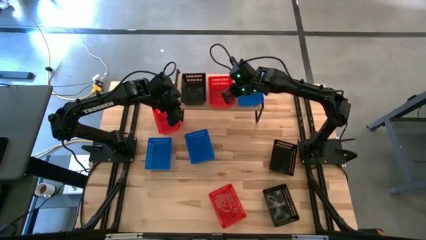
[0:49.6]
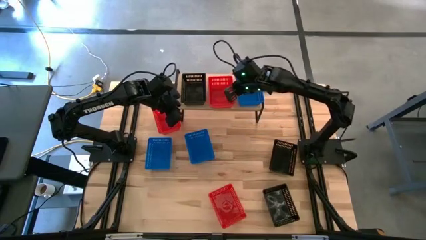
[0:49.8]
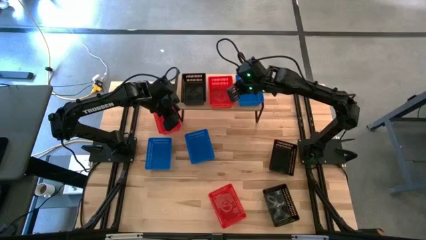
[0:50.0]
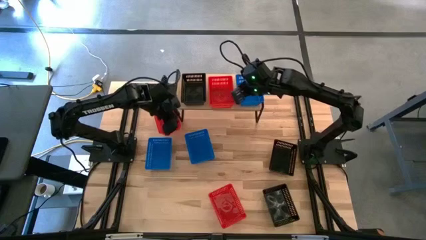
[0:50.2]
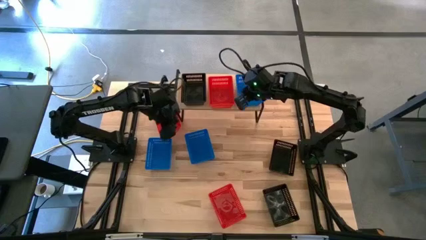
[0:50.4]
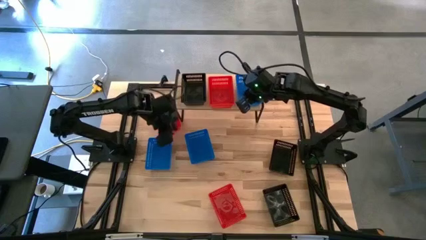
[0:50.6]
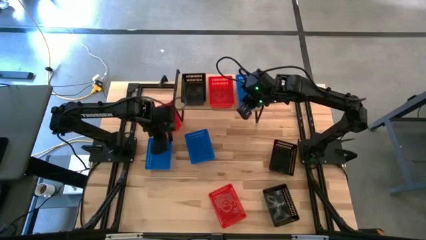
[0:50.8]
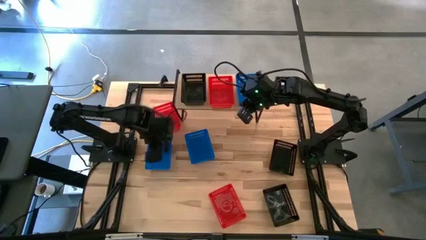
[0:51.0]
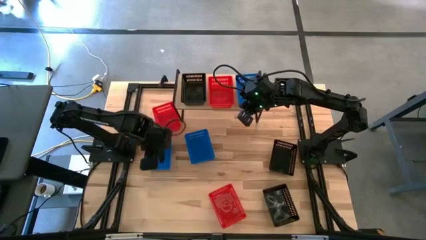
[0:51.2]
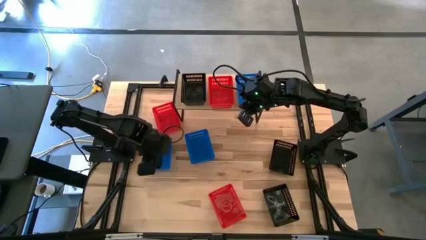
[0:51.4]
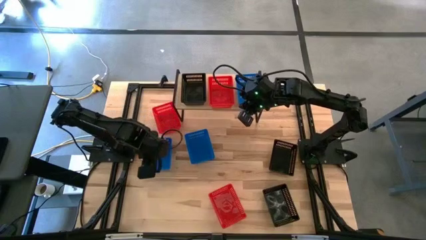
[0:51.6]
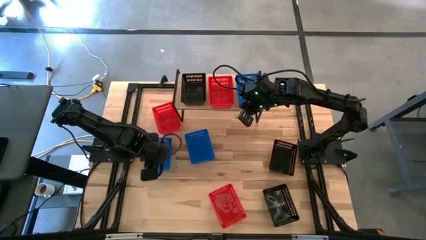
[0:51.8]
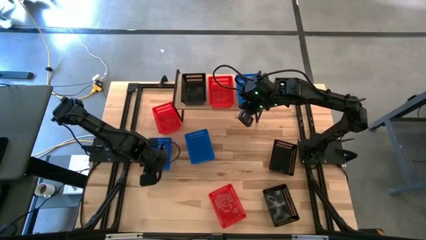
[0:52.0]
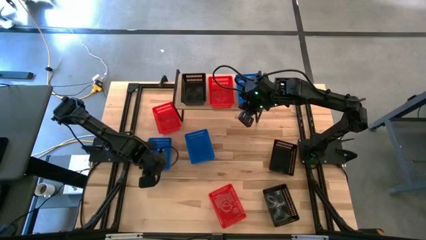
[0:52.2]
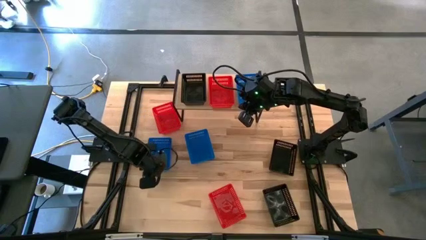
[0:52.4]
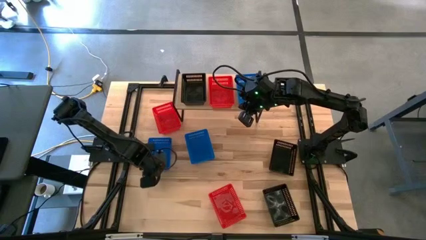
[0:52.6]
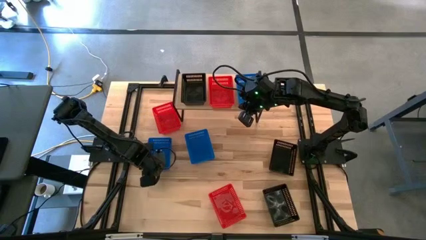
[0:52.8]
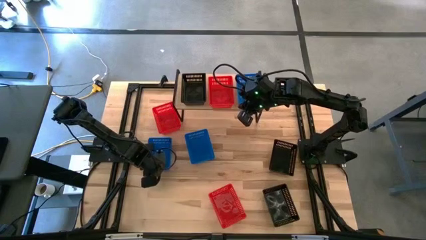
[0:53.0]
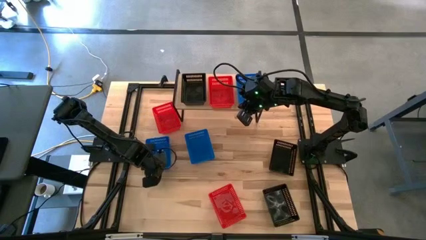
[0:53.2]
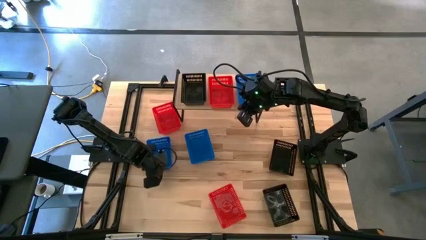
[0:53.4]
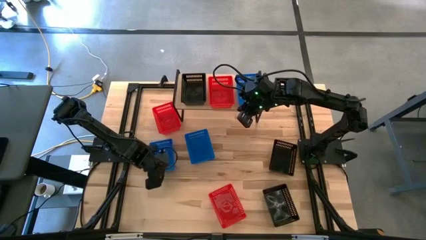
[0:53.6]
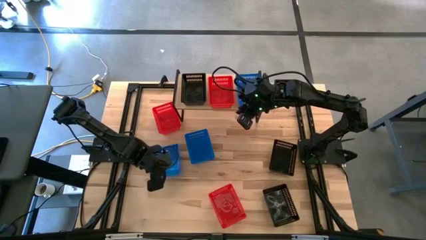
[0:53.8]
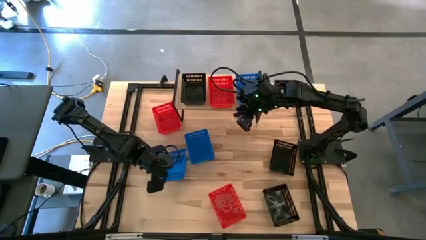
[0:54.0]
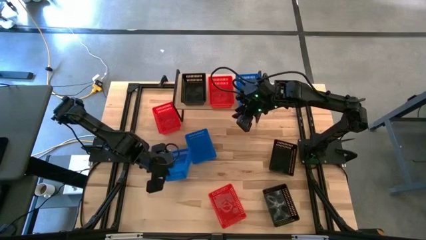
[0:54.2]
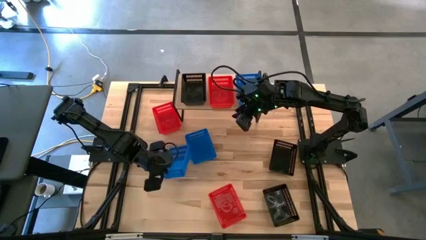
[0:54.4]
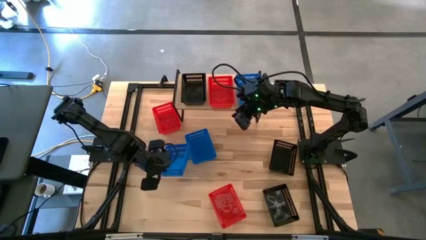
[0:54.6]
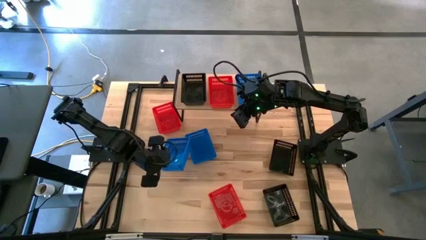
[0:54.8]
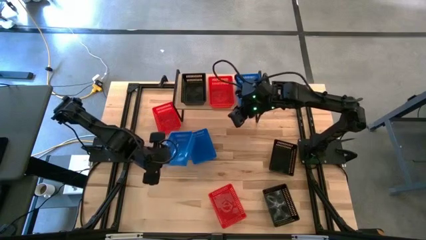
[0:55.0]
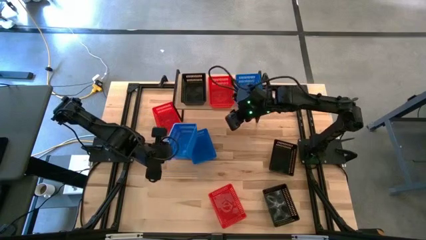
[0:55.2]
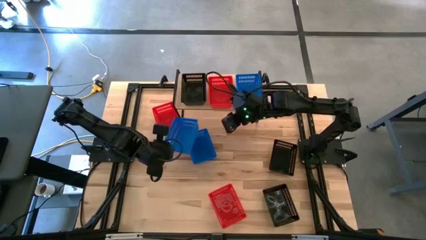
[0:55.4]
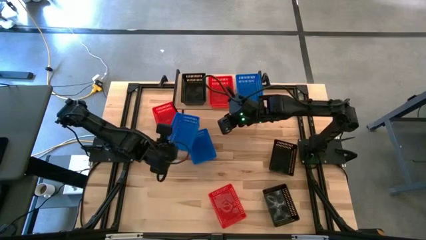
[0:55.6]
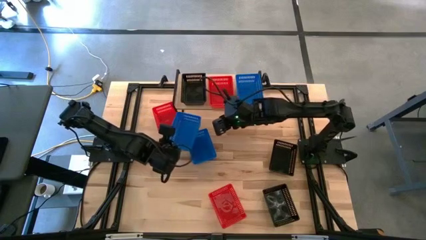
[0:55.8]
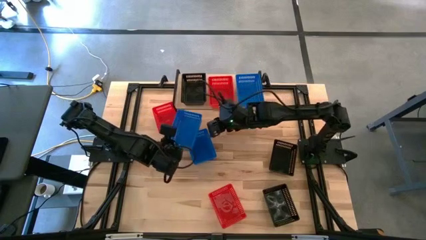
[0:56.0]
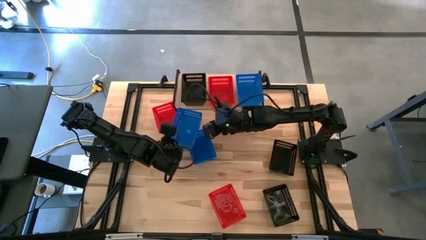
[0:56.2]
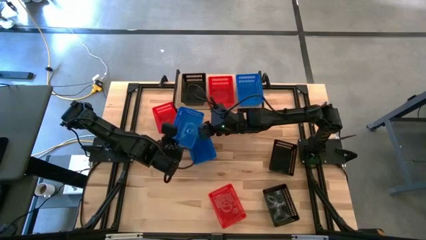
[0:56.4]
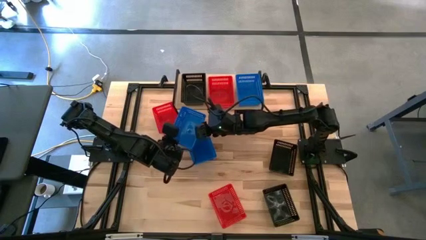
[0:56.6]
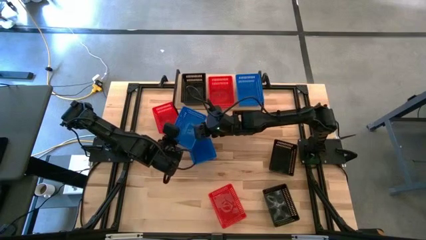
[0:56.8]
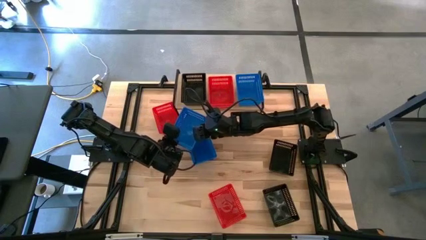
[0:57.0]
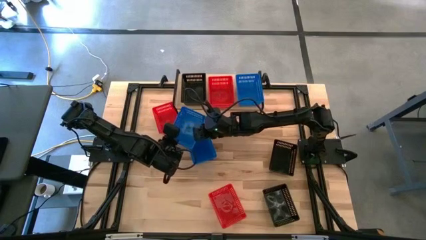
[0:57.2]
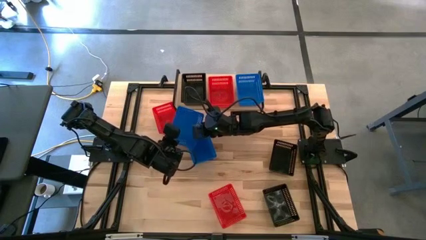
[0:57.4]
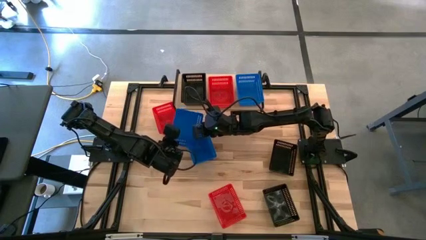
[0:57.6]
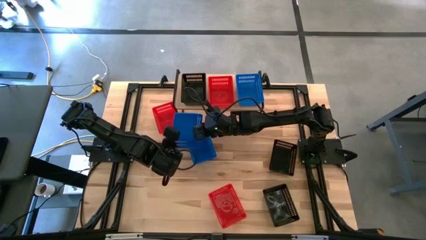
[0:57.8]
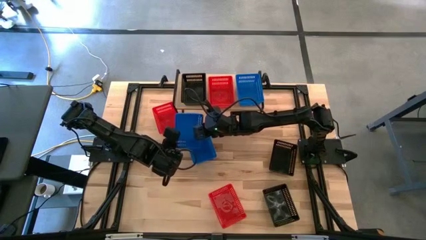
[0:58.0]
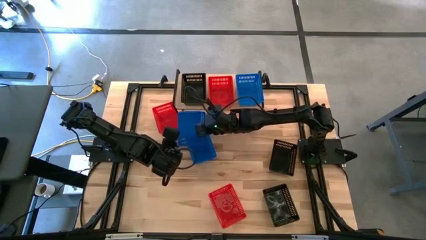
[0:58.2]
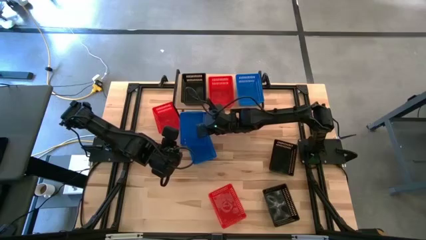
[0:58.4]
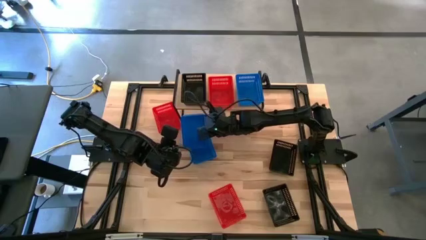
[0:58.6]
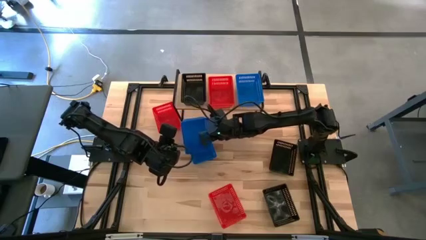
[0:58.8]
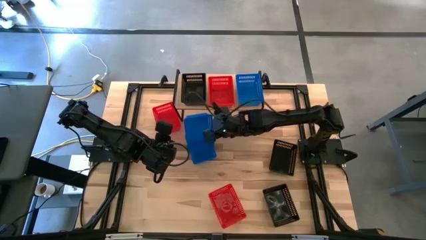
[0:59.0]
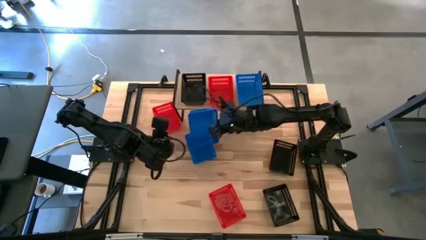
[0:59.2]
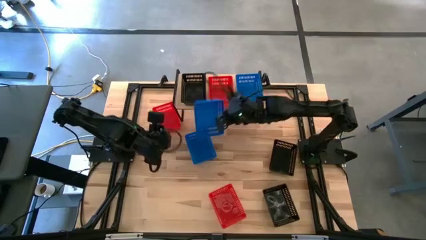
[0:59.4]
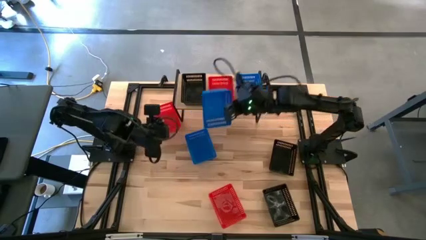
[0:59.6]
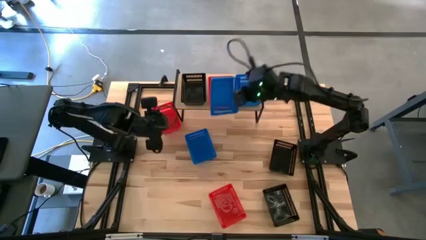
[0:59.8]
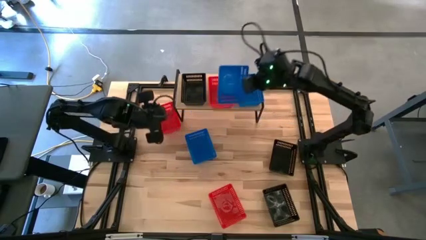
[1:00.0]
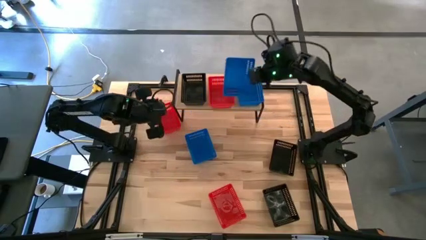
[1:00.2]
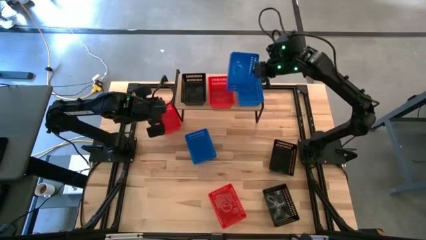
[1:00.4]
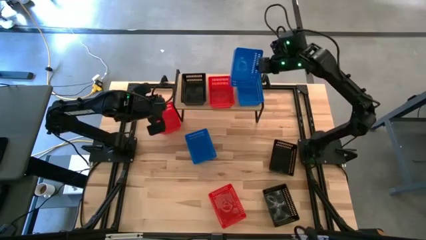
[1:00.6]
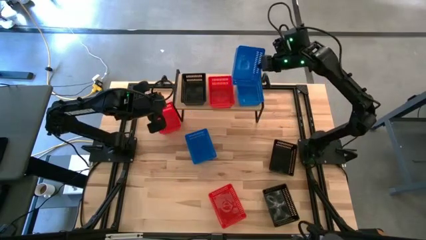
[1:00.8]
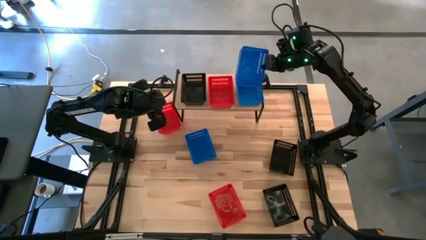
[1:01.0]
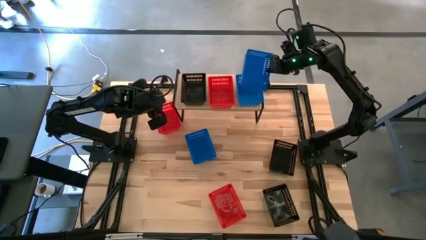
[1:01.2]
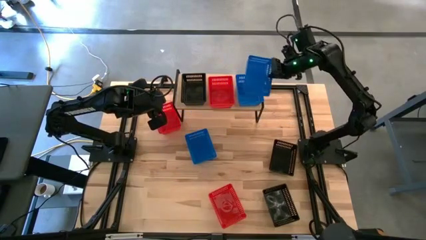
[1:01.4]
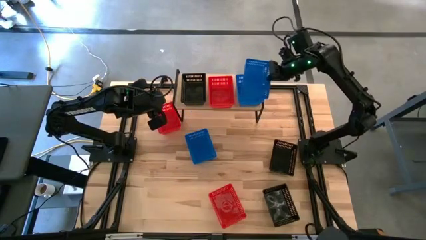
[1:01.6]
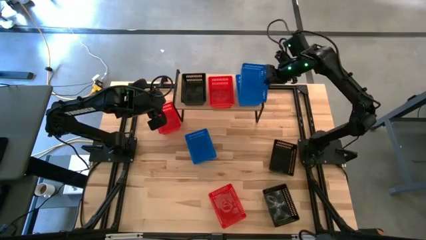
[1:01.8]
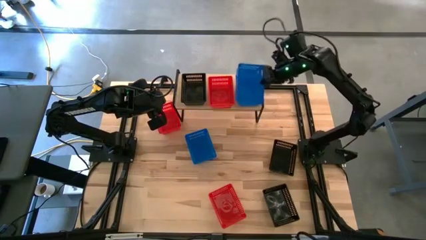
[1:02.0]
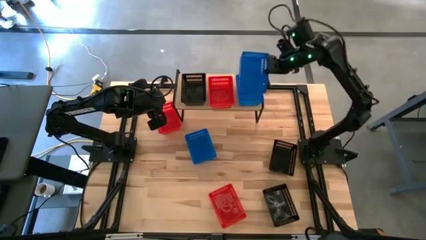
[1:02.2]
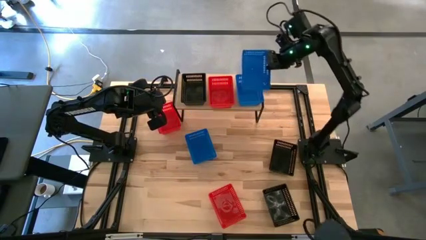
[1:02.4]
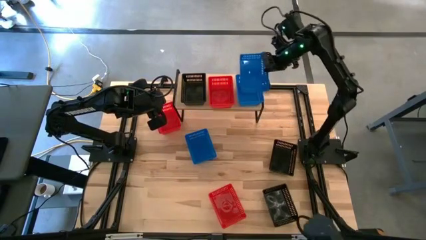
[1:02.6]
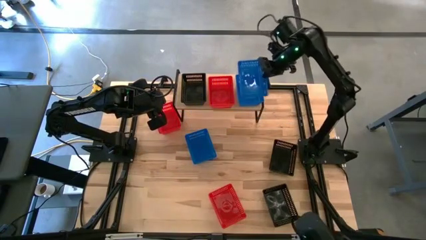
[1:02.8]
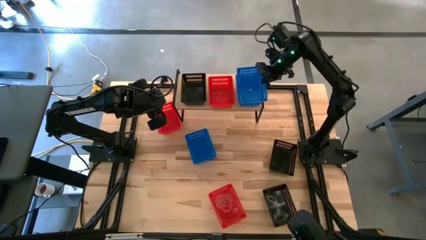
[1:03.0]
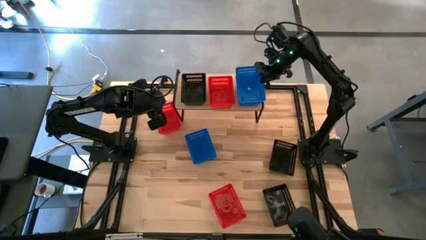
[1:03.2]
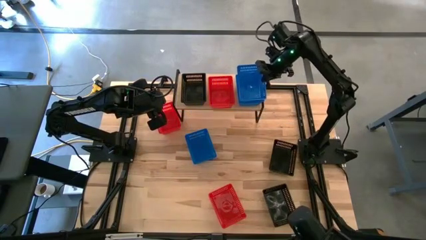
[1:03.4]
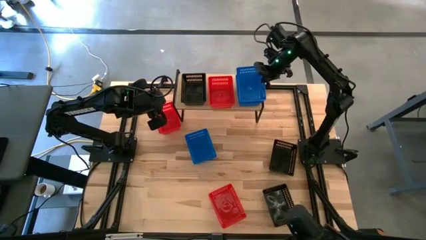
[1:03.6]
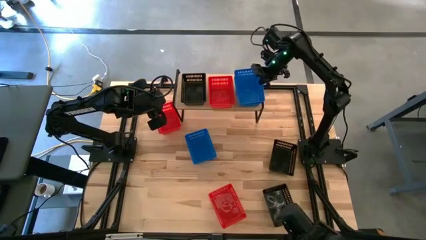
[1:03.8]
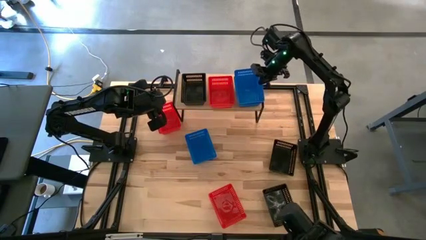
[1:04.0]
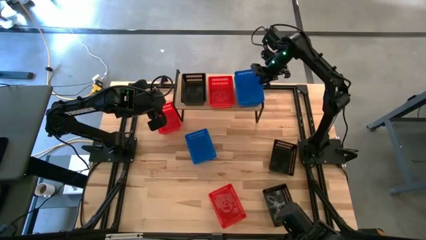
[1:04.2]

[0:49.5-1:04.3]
Task: Stack baskets on shelf by color
Stack the left blue bin on top of the blue bin on the shelf

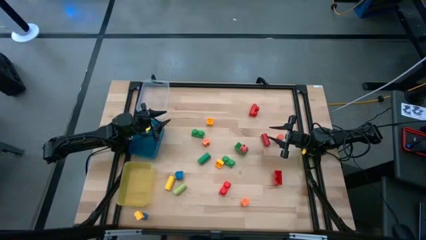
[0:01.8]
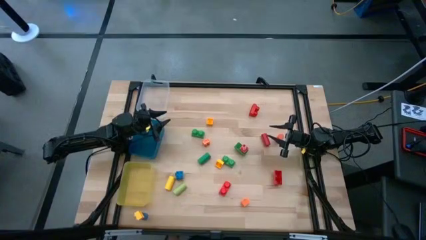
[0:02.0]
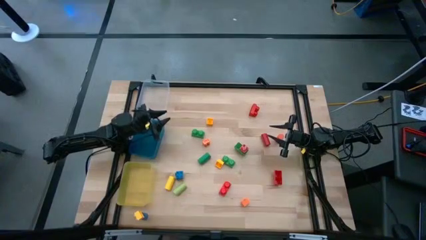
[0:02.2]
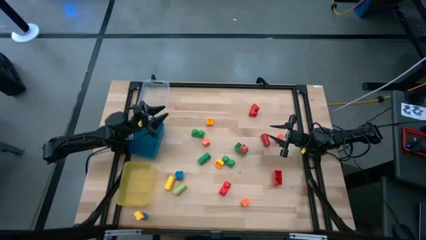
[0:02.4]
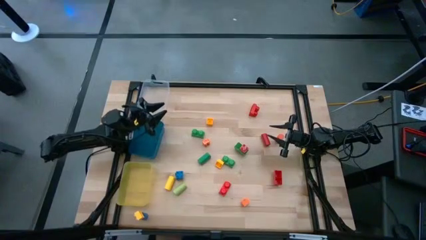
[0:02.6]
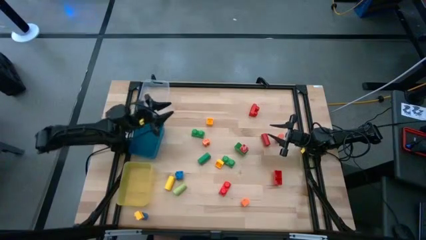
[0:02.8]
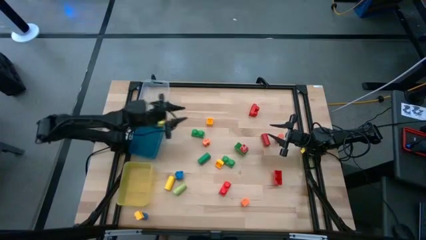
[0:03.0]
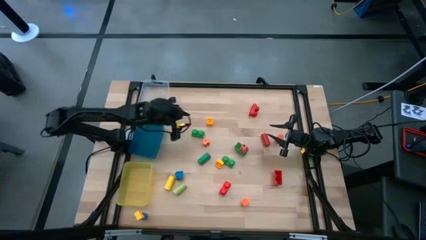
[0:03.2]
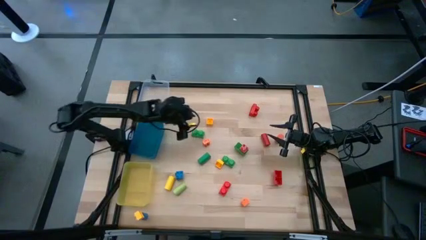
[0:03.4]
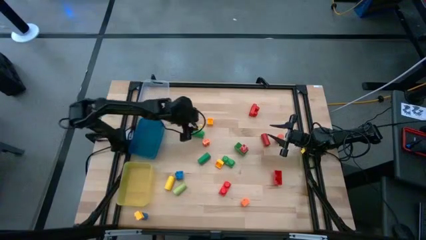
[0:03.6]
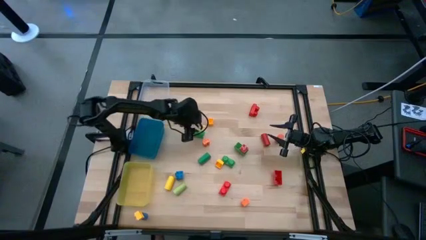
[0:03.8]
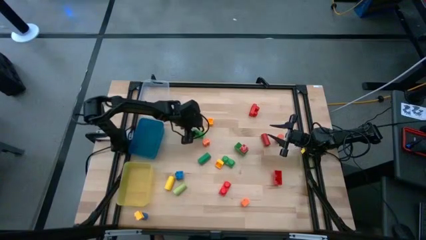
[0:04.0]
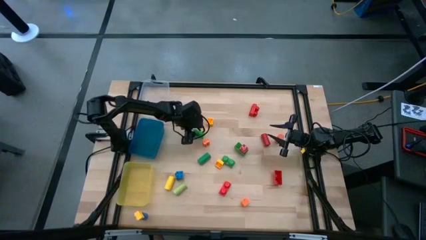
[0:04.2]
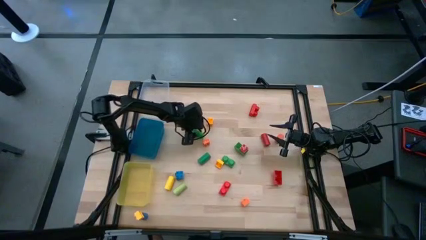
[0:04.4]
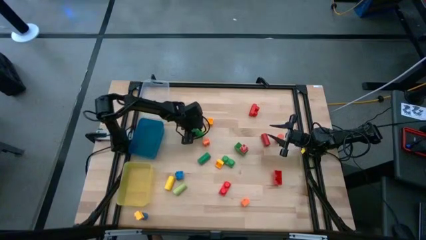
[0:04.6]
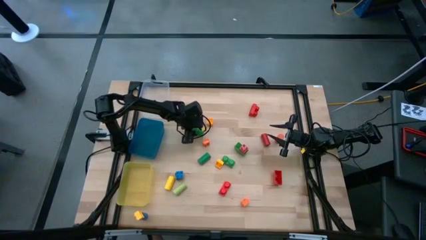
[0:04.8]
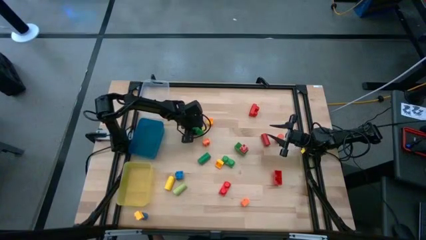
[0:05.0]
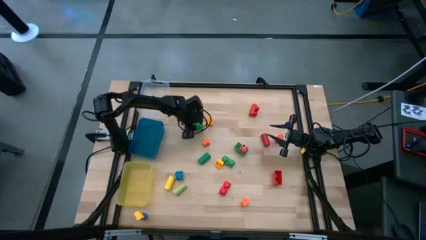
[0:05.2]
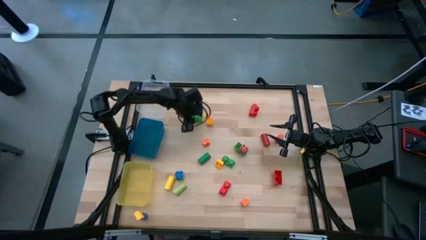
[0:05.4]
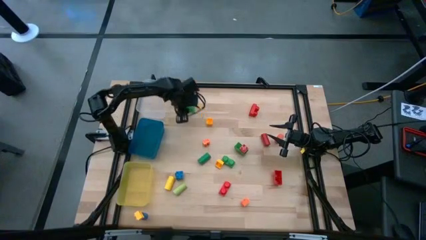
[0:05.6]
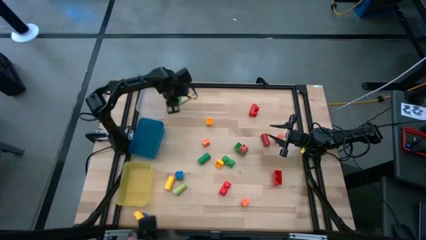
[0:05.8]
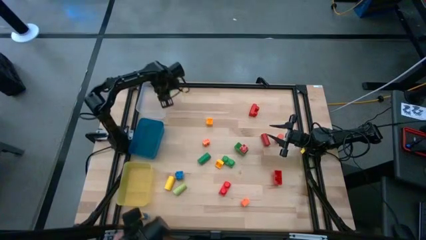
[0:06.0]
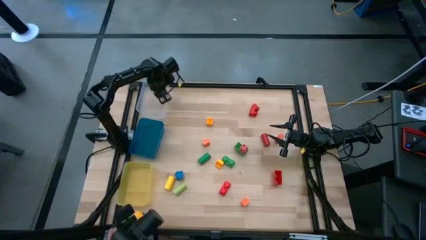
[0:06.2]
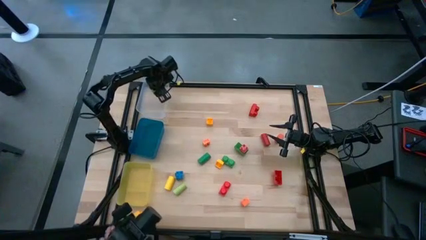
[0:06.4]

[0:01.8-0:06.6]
Task: Sort blocks by size
Put the top left green 2 stud game piece into the transparent bin
